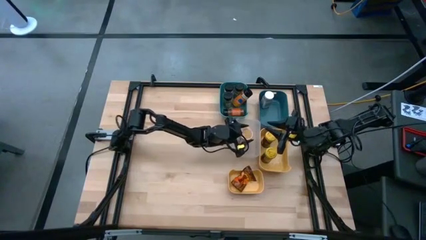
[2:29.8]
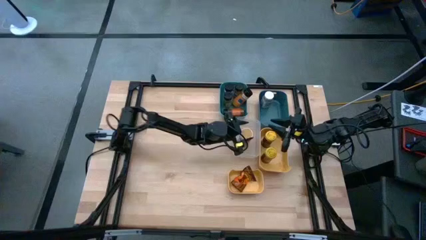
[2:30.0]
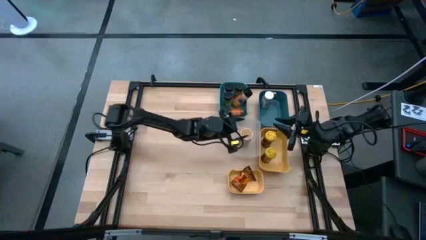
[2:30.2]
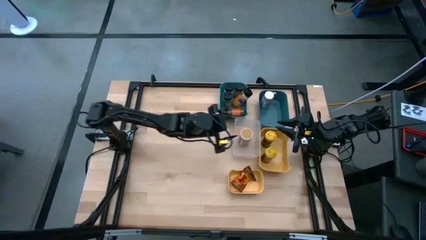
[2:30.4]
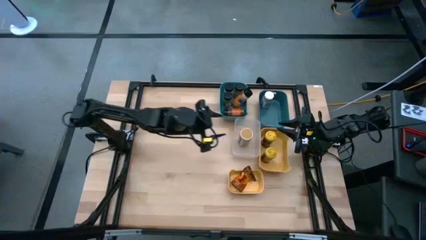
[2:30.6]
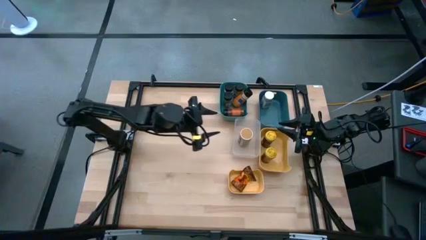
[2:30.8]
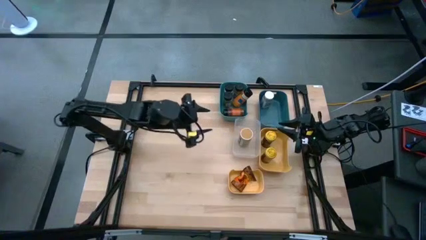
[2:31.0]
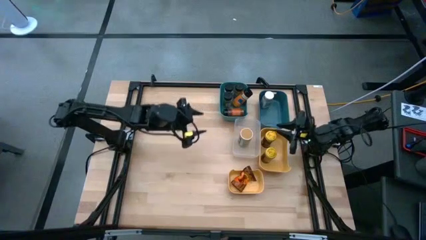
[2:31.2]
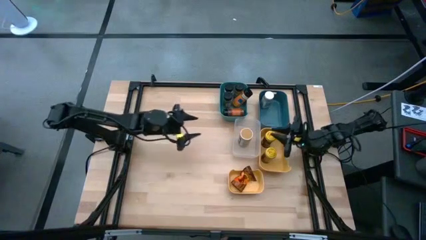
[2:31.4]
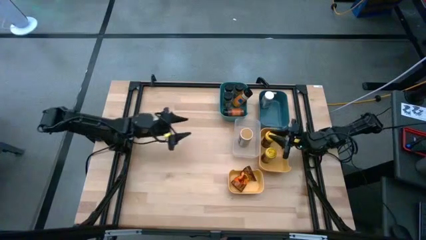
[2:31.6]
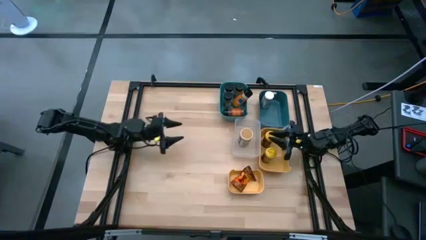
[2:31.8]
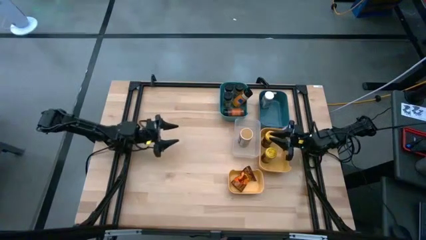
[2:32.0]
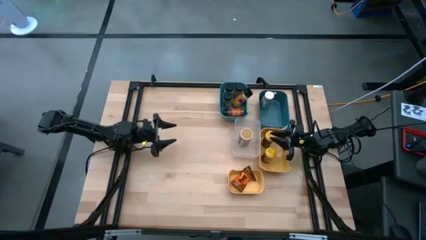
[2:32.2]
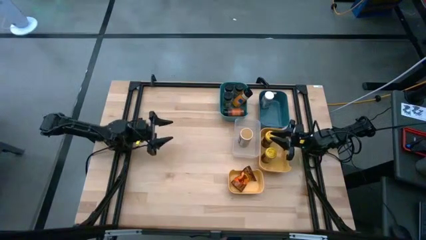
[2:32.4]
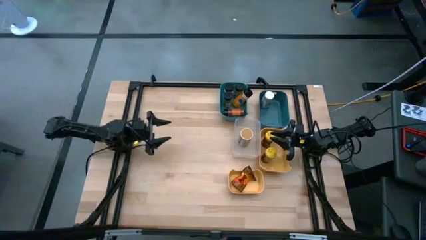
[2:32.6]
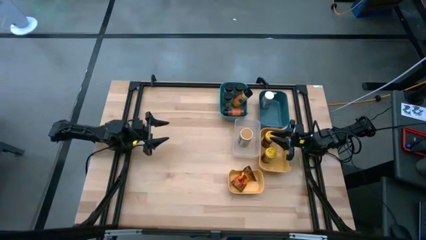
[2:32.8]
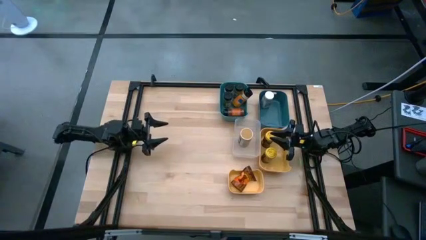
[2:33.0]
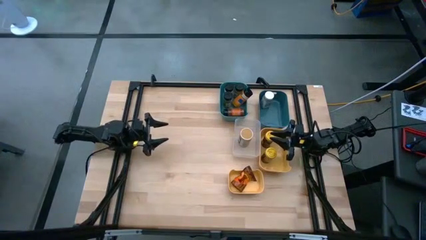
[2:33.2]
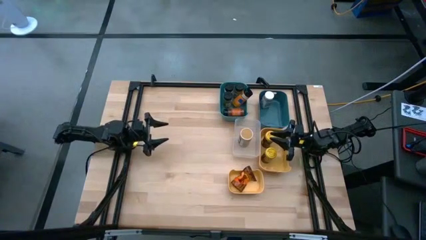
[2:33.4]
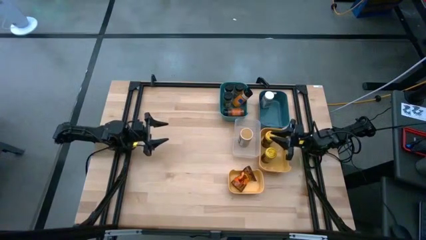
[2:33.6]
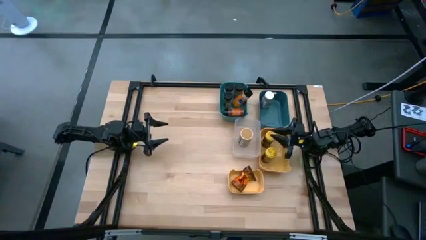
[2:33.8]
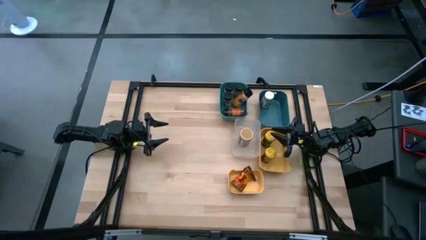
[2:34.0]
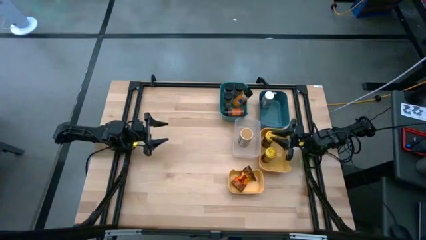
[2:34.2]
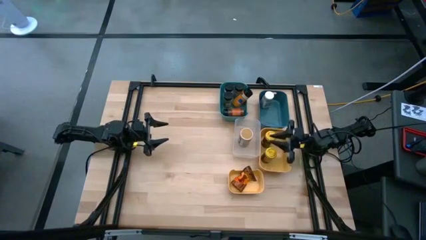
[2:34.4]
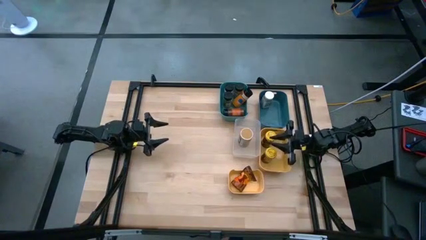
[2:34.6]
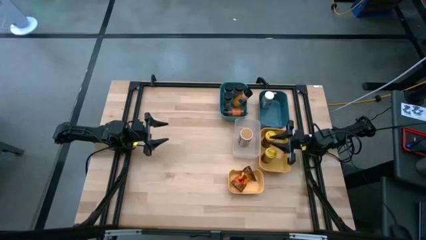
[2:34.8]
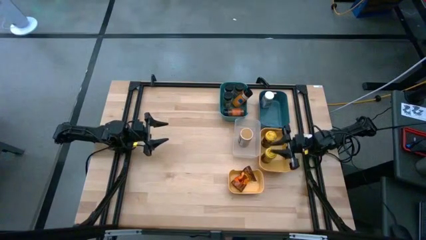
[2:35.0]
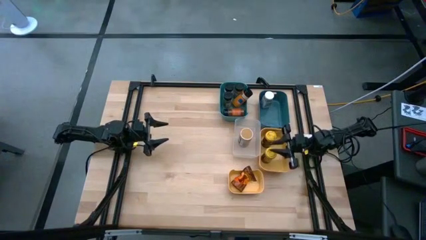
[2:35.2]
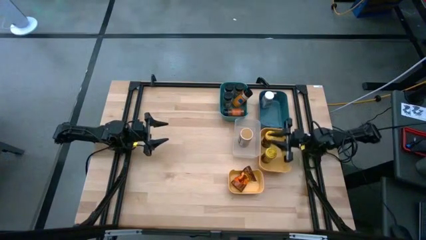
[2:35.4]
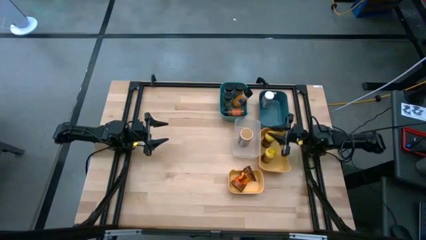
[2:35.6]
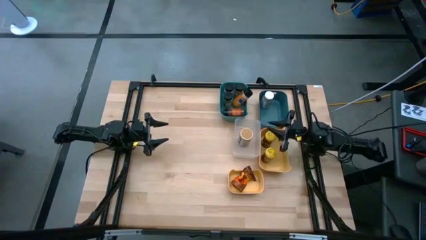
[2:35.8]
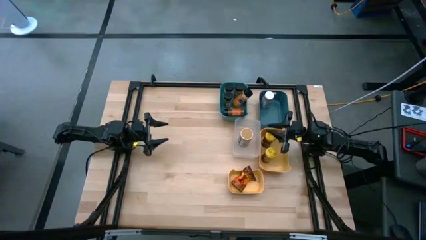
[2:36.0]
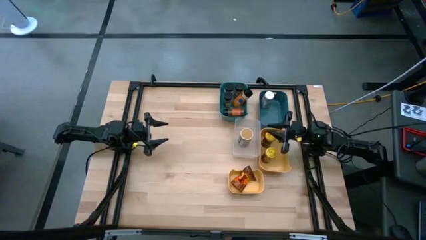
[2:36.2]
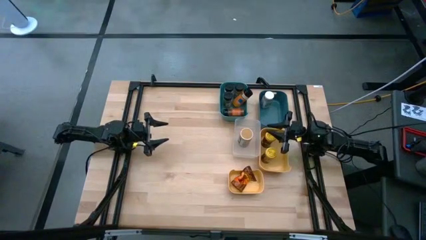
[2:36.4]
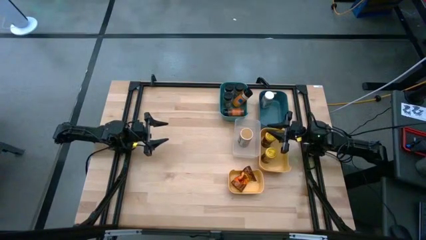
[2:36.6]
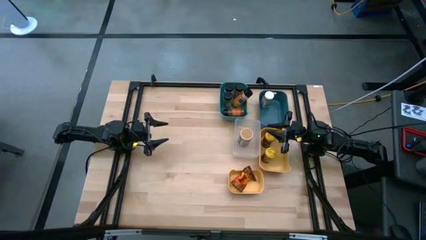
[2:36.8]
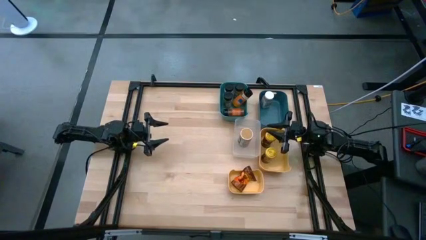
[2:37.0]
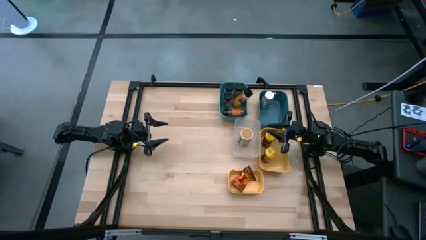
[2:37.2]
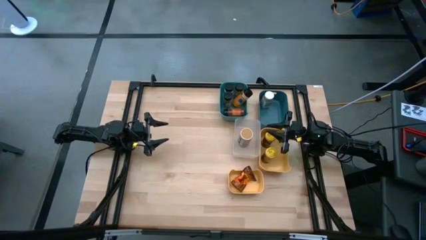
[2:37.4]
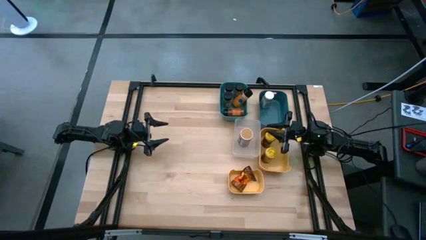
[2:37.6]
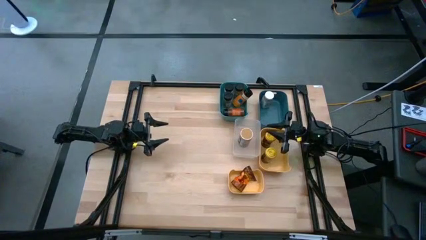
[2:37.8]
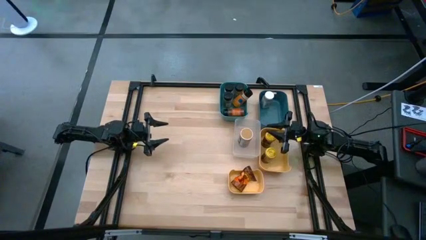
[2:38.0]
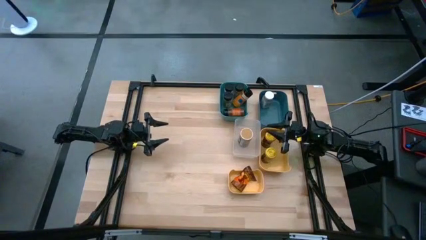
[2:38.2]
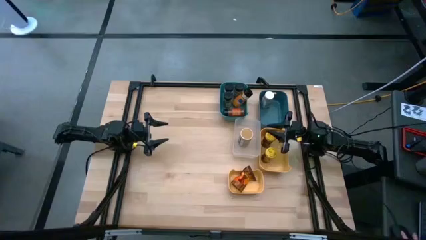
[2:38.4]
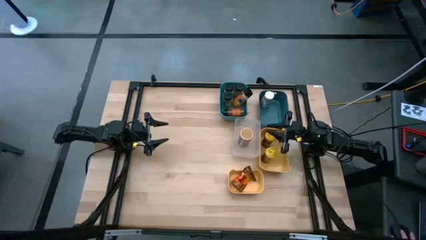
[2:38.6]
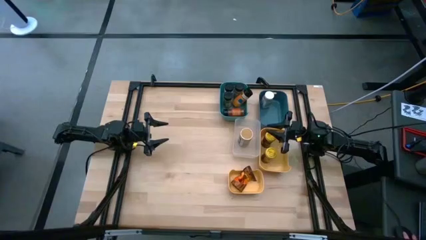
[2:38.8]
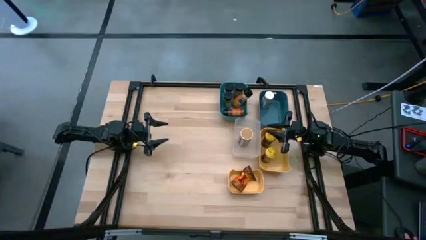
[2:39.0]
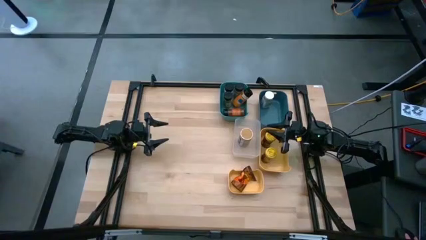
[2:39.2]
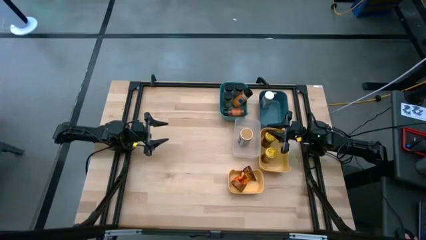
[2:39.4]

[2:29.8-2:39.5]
Task: Sort spices by type
Return to Home Position

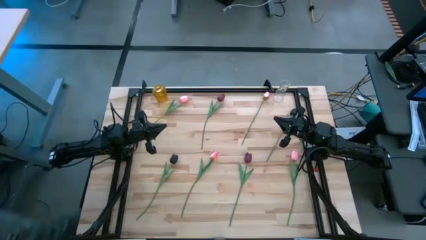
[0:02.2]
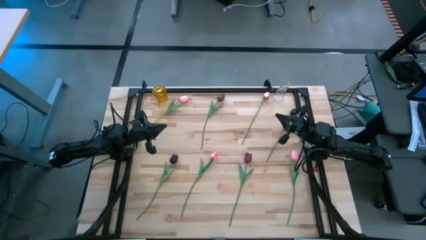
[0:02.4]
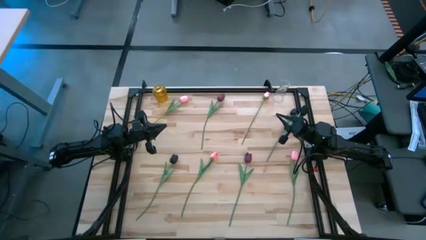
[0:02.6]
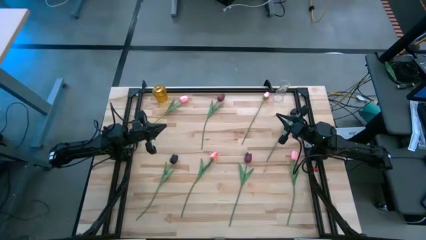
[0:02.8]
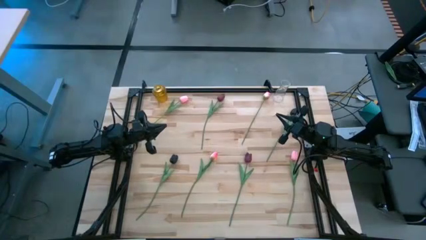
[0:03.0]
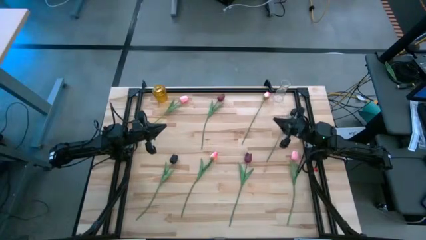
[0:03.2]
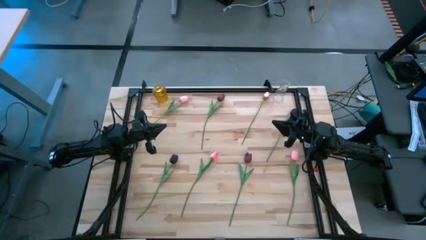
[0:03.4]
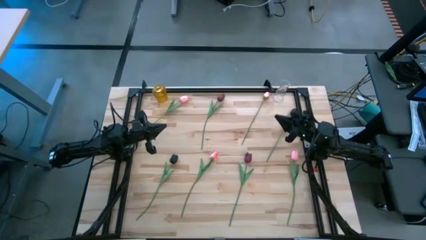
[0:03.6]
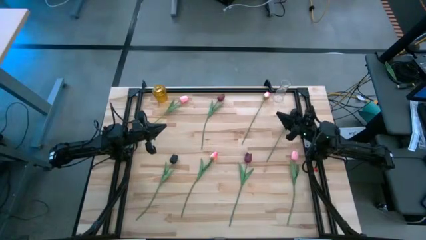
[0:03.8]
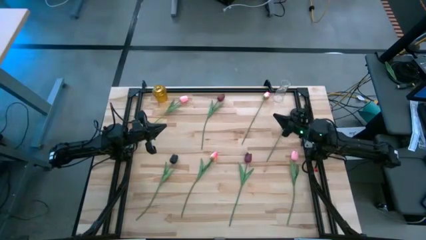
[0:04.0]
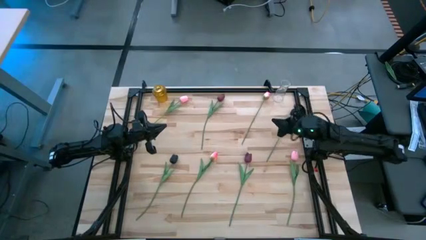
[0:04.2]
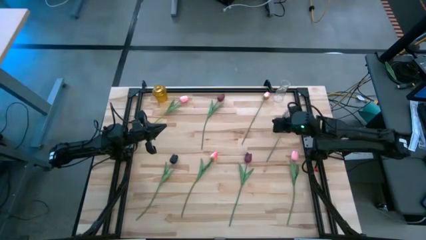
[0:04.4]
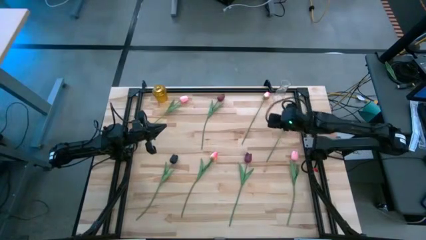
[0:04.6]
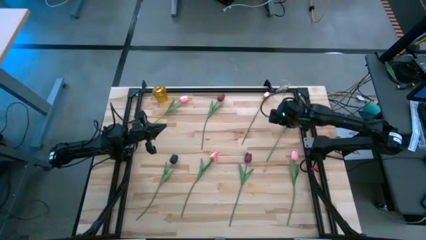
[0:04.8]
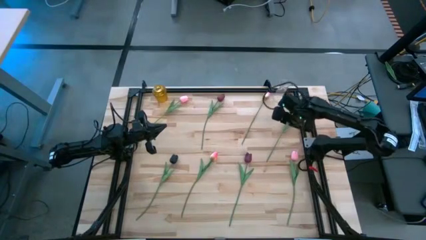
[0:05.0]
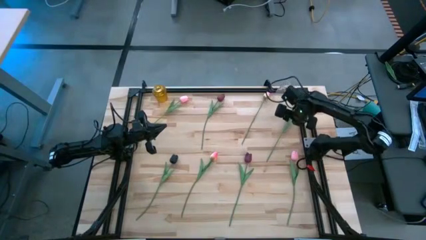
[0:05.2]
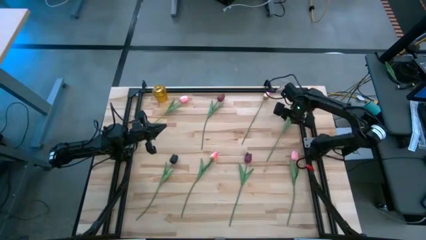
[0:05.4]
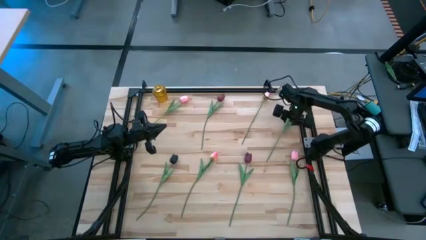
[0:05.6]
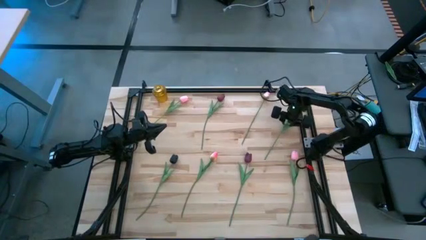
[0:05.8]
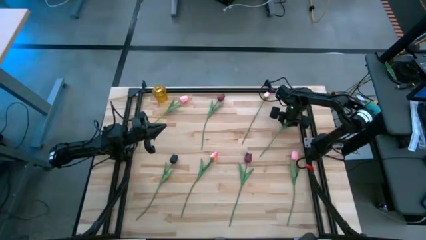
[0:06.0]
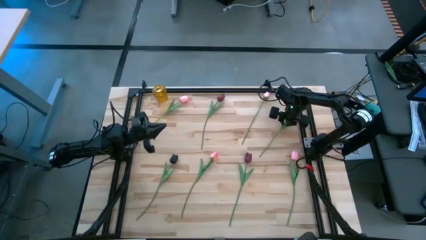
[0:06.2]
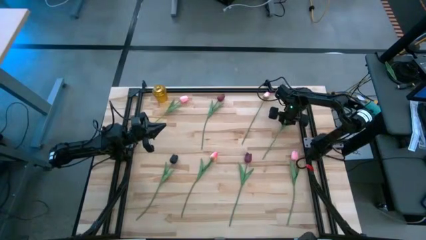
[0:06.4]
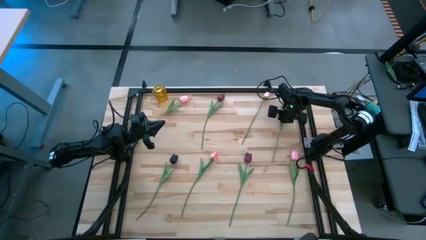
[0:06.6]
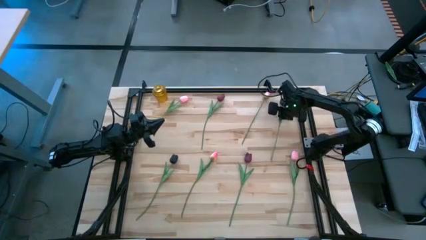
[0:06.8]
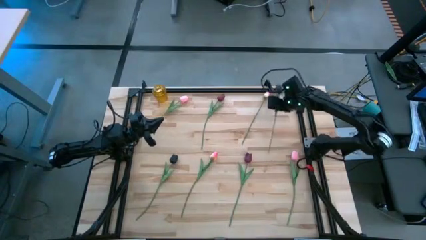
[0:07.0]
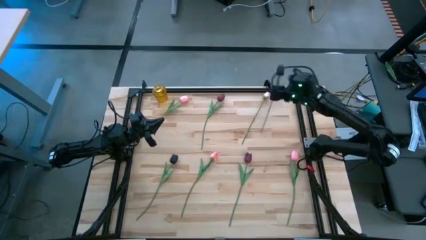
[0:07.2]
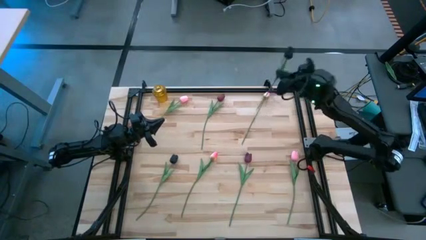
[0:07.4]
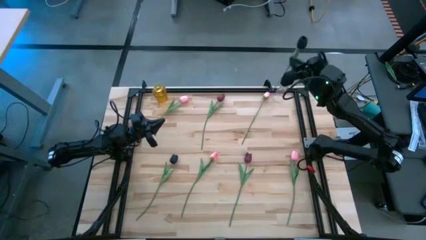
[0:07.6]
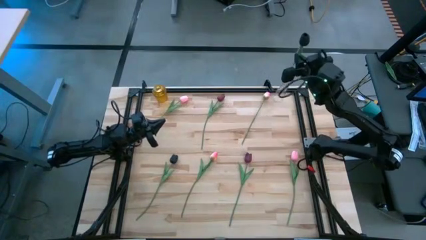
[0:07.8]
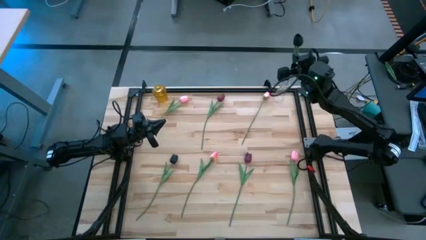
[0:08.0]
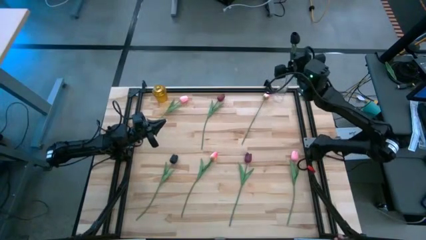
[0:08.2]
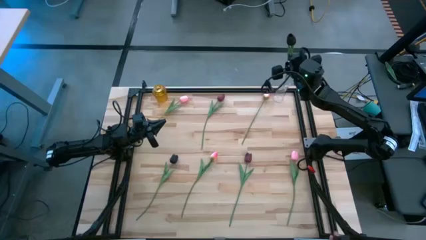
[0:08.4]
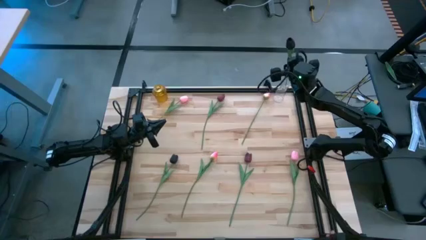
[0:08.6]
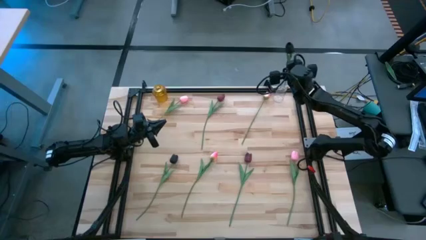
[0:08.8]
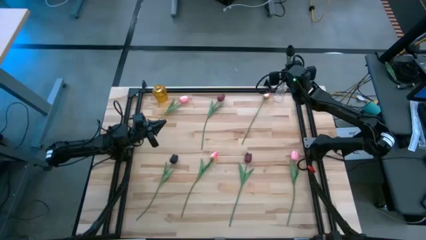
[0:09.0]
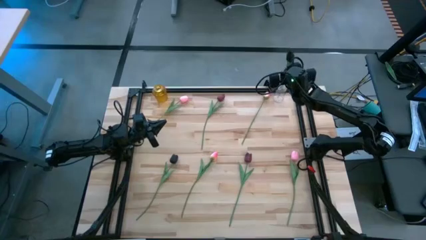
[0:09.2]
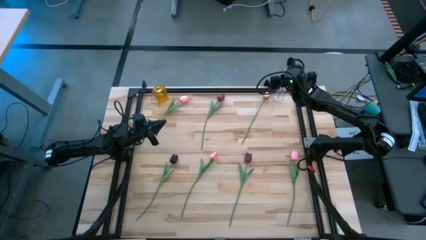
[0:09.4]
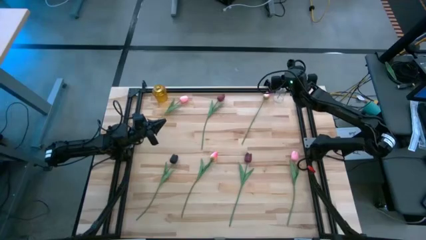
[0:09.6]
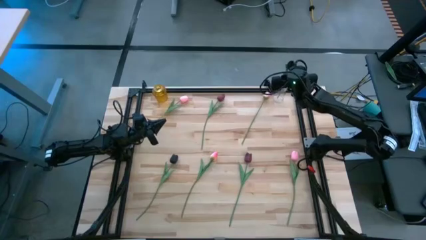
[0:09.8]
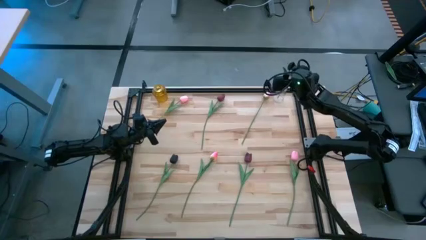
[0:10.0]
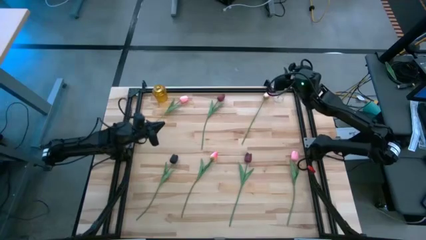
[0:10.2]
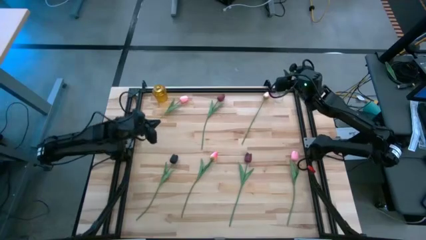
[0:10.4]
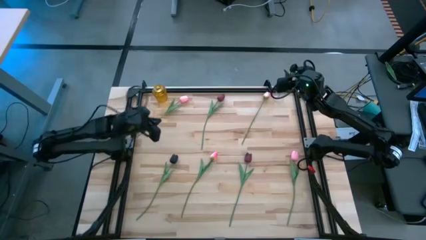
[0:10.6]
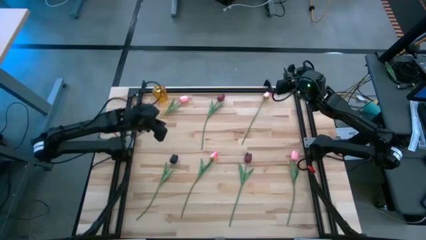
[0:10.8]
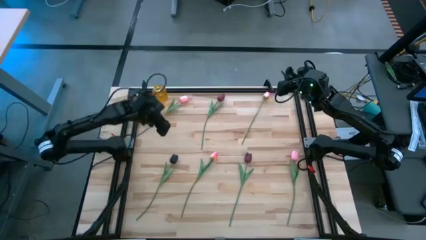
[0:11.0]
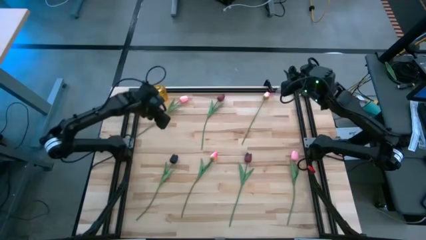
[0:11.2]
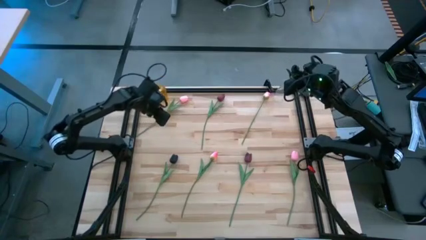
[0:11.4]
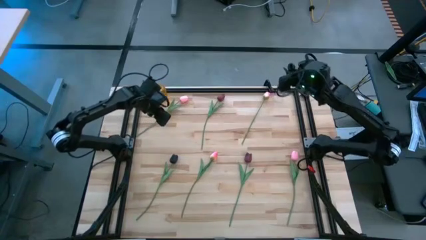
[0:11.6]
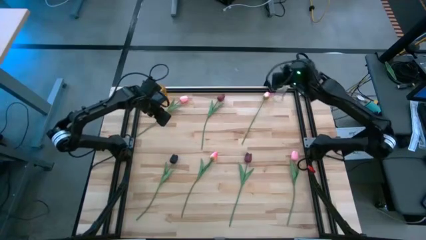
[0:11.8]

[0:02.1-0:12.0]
Task: Sort flowers into vase by color
Insert the top black tulip into the transparent vase
